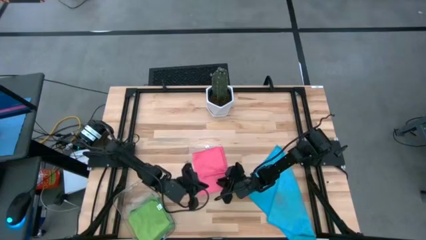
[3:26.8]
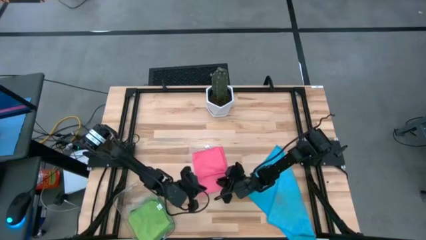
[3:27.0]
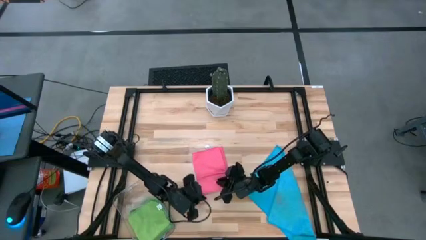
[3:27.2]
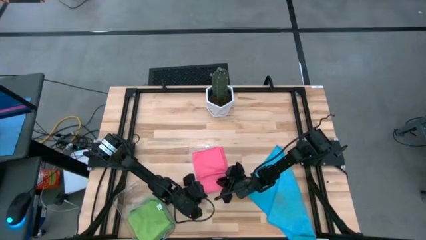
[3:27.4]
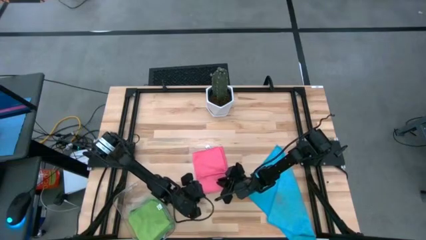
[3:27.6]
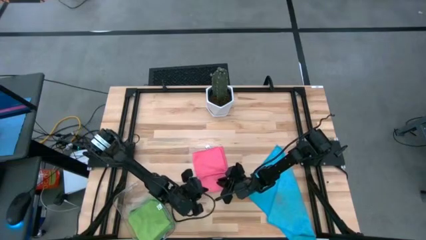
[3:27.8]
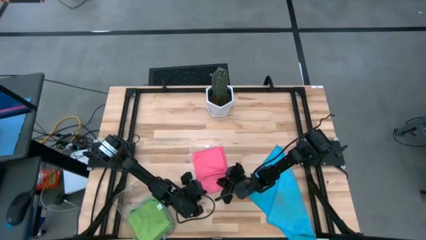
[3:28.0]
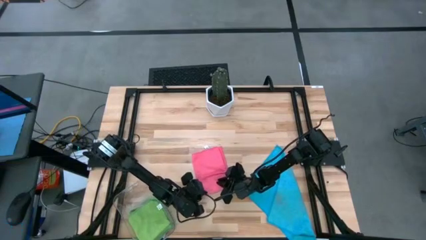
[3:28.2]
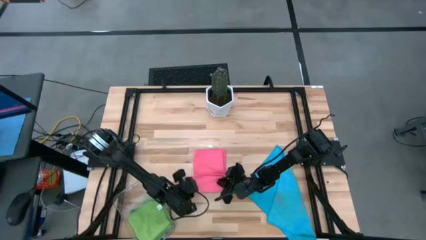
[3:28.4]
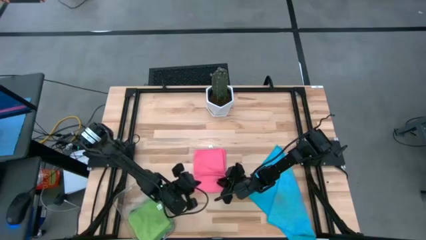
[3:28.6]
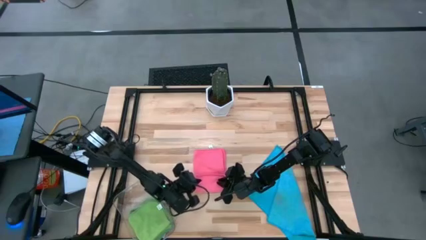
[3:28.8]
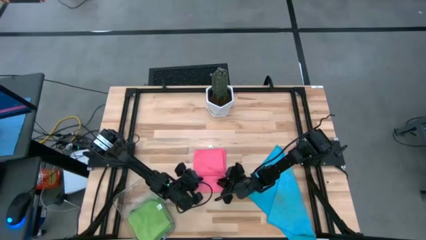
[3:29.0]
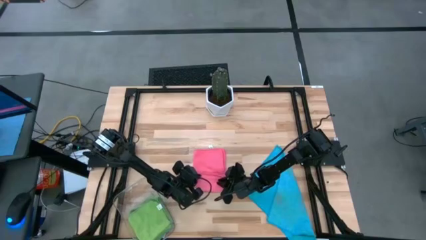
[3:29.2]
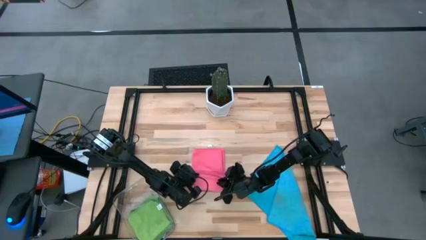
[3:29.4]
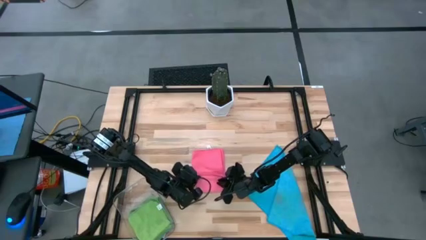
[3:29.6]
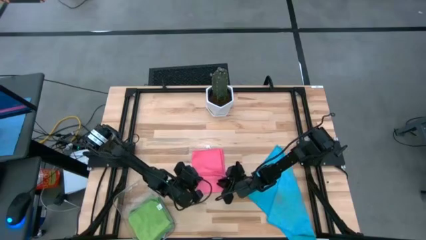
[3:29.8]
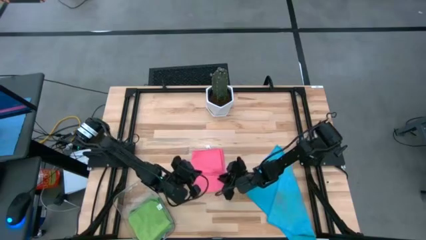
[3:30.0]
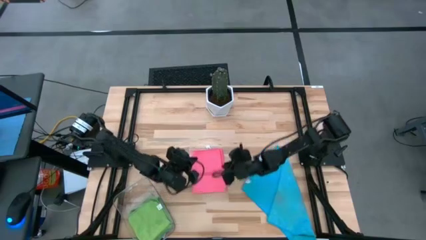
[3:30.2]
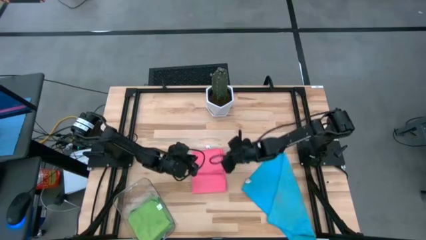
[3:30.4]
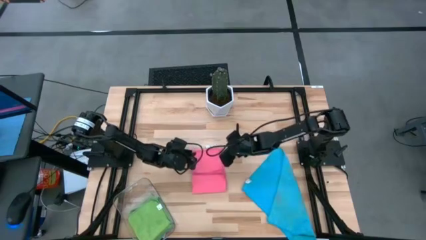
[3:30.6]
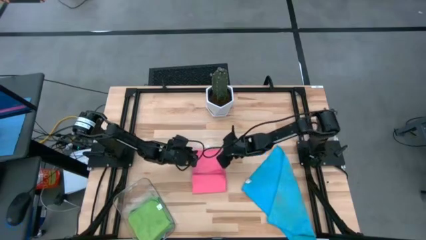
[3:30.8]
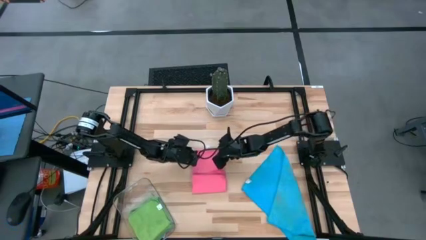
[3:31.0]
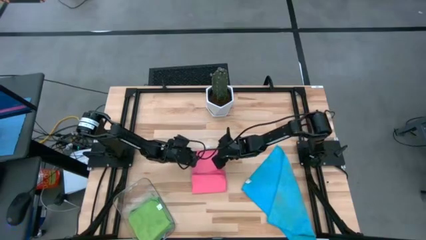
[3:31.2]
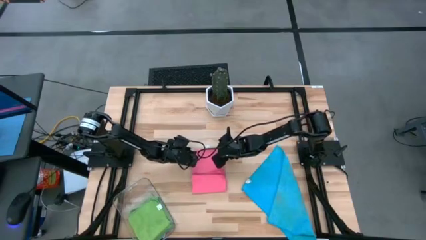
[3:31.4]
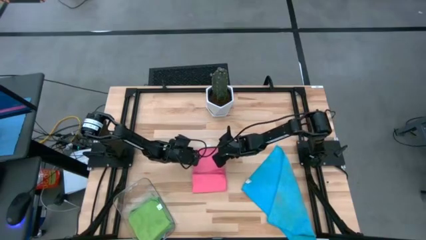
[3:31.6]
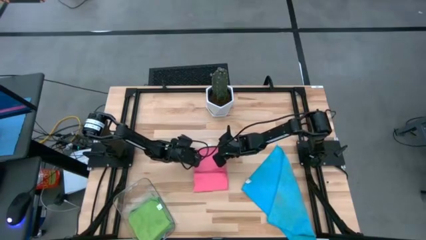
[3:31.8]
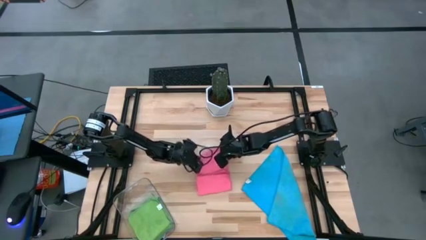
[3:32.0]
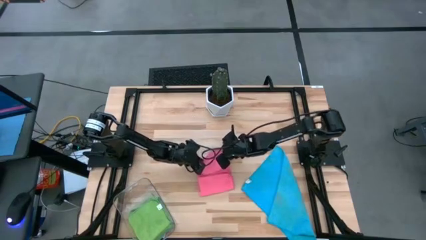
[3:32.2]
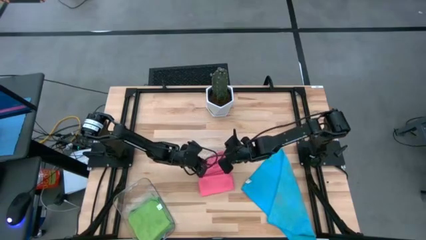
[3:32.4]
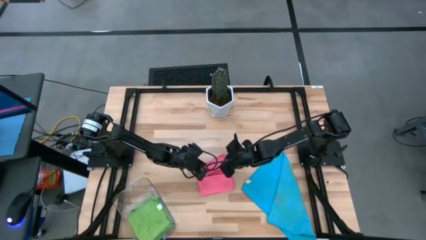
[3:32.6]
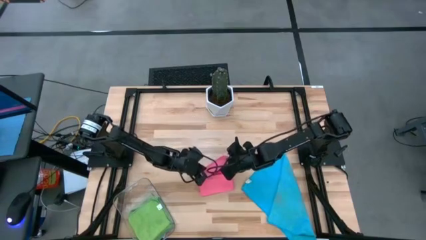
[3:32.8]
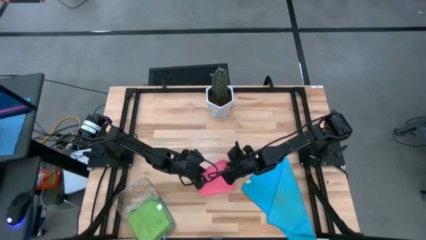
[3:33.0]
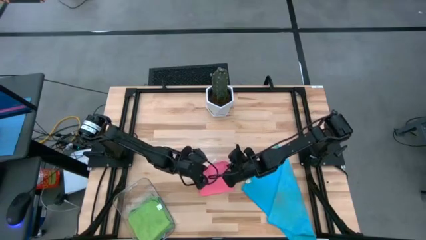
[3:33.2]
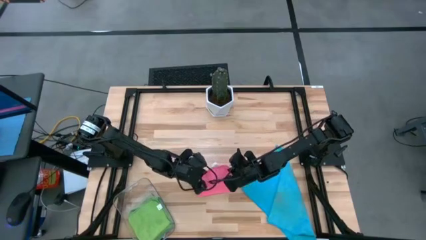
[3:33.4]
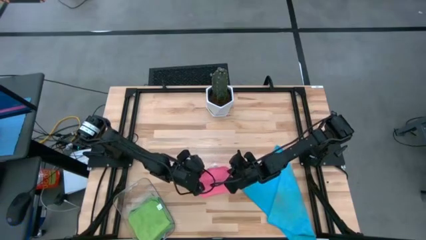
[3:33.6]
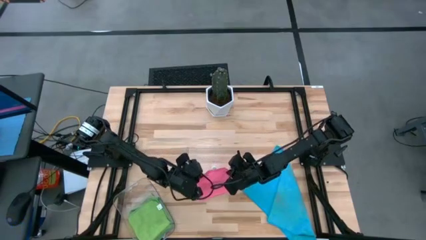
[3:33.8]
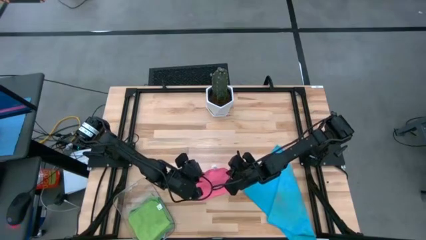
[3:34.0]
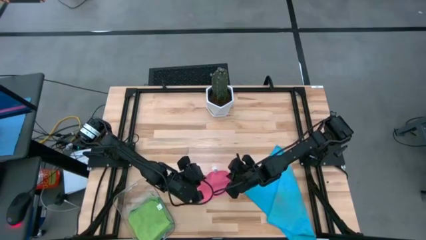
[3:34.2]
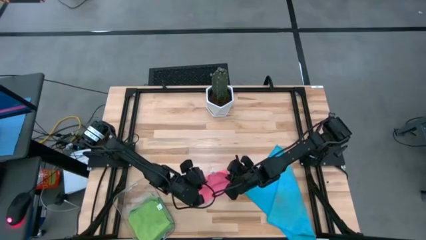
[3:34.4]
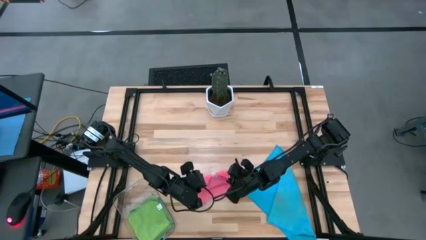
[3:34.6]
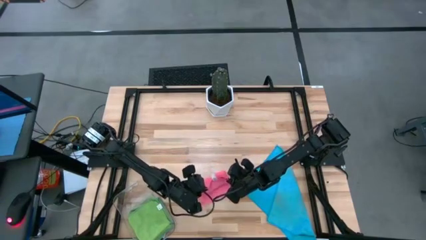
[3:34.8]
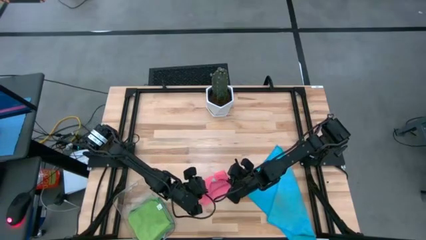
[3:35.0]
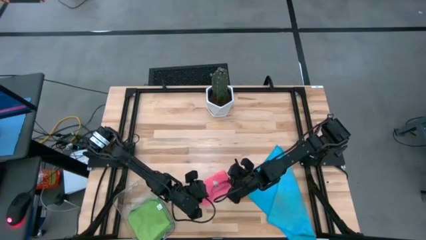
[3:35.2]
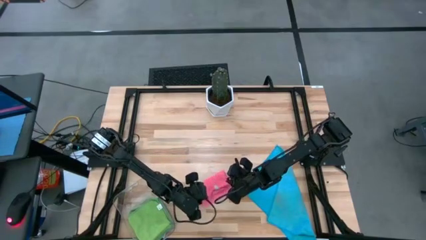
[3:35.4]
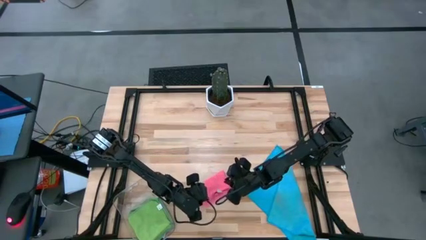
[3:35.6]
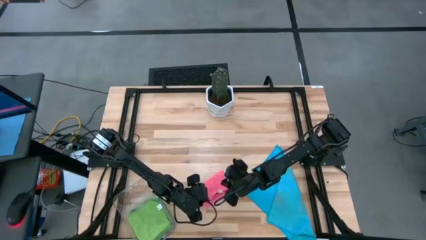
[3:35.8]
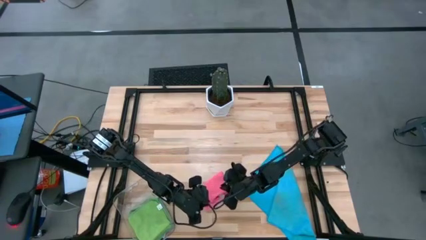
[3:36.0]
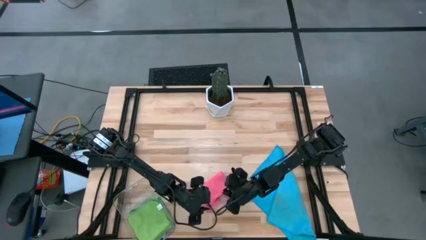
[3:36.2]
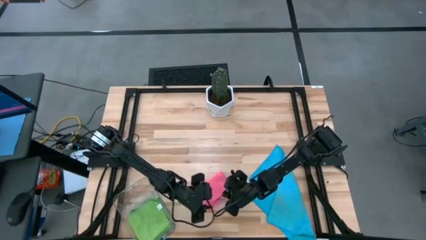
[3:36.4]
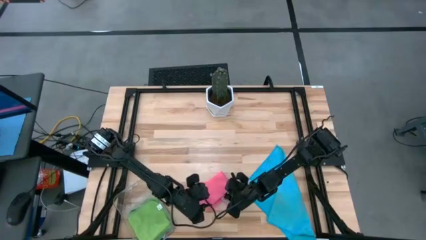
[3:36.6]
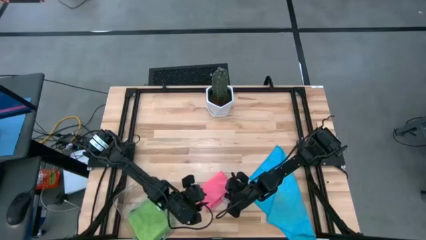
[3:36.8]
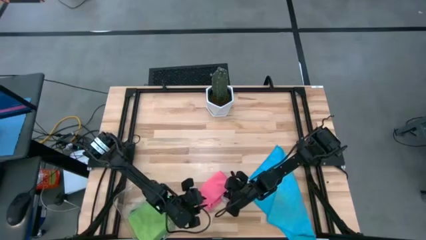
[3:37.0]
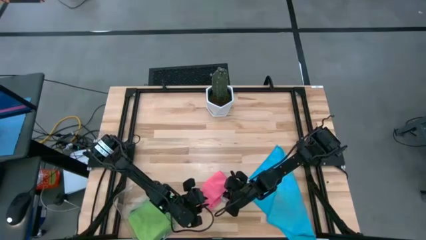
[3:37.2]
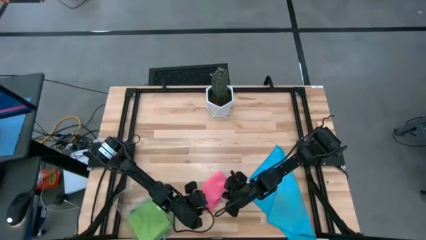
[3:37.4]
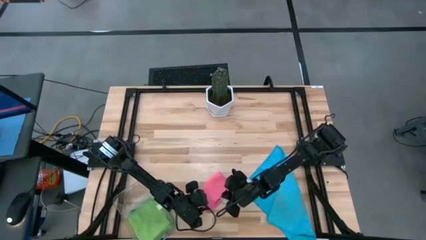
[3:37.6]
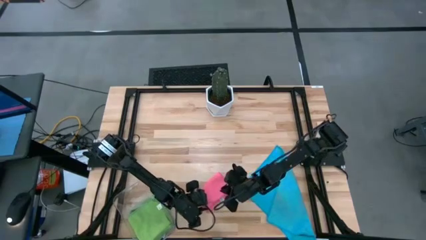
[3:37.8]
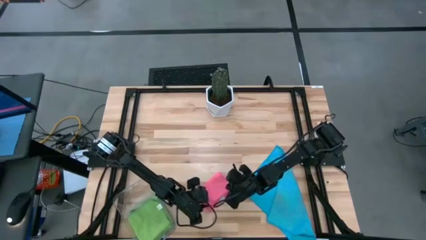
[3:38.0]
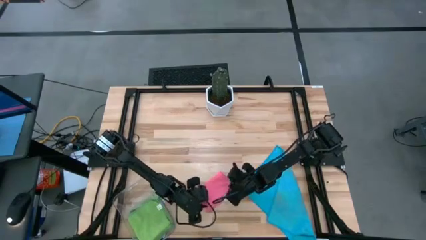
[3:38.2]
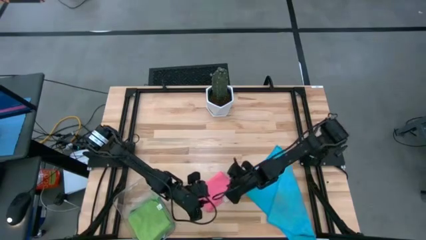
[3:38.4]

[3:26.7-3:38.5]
Task: Fold microfiber towels
Fold the pink microfiber cloth

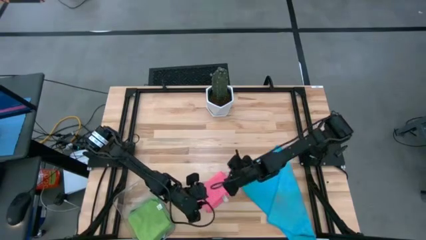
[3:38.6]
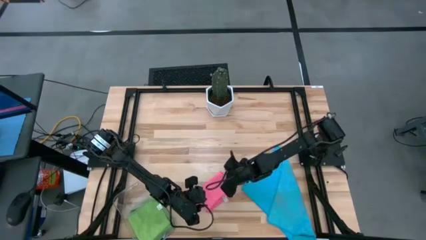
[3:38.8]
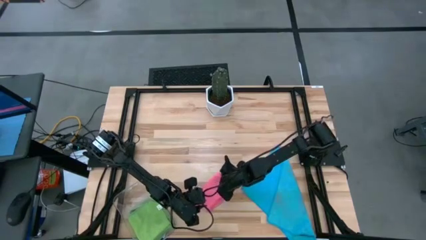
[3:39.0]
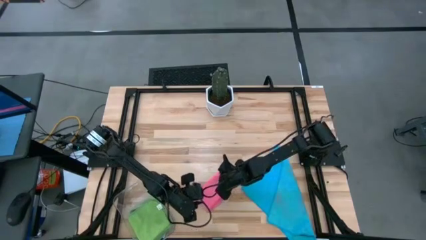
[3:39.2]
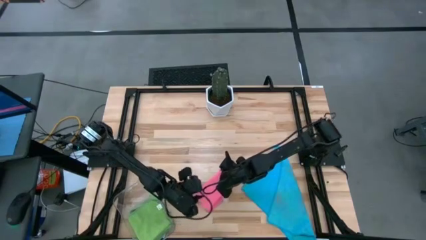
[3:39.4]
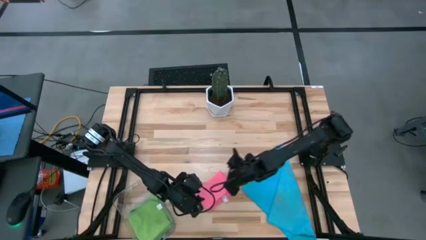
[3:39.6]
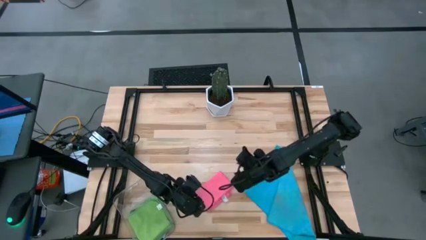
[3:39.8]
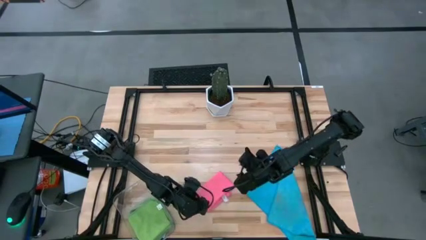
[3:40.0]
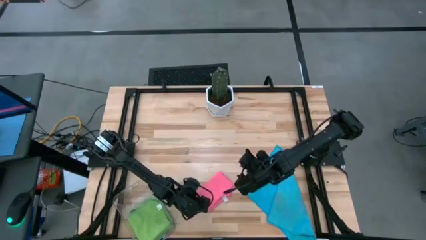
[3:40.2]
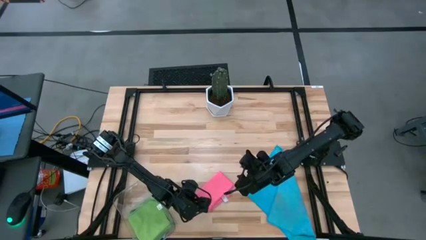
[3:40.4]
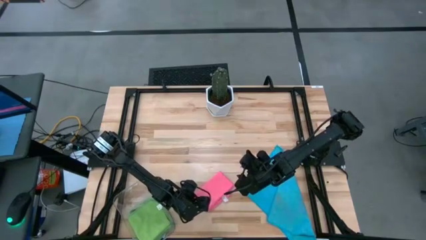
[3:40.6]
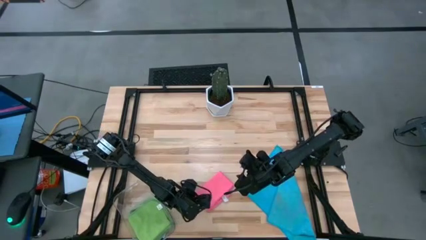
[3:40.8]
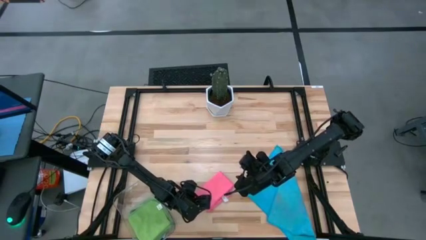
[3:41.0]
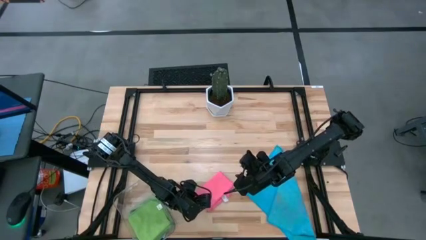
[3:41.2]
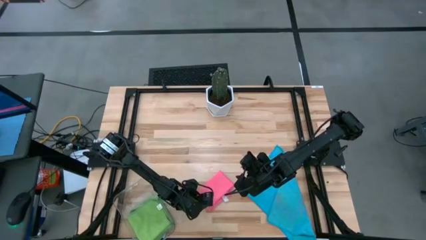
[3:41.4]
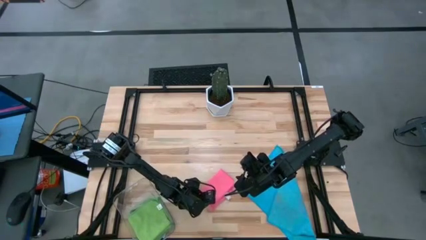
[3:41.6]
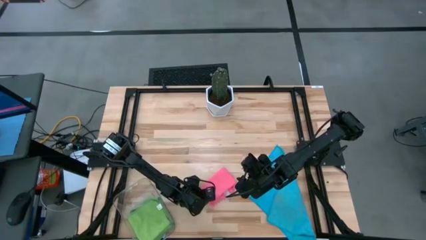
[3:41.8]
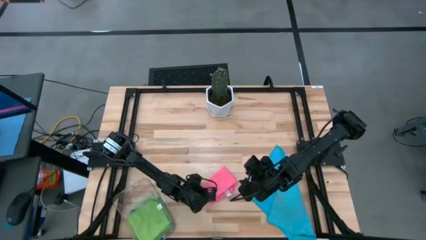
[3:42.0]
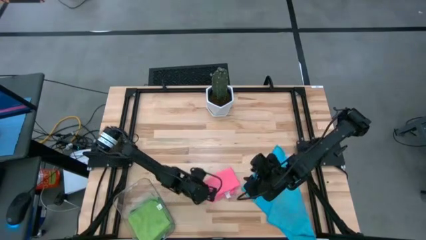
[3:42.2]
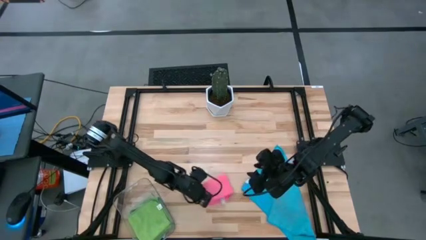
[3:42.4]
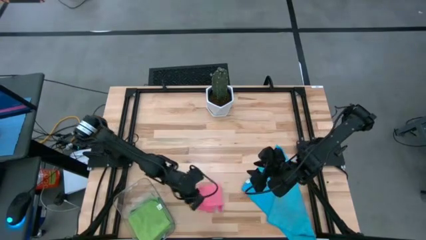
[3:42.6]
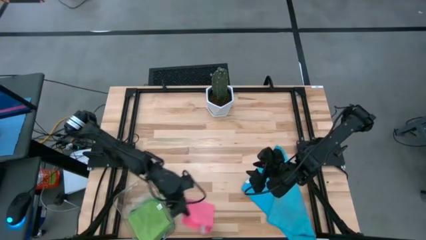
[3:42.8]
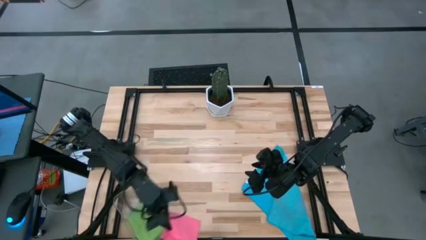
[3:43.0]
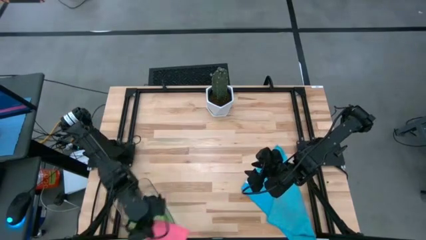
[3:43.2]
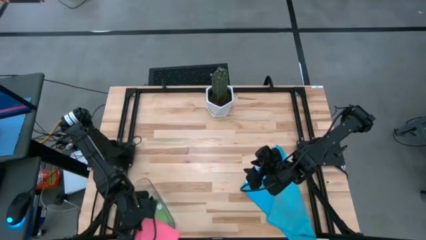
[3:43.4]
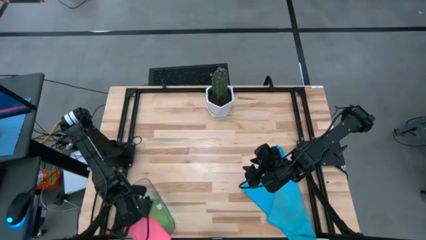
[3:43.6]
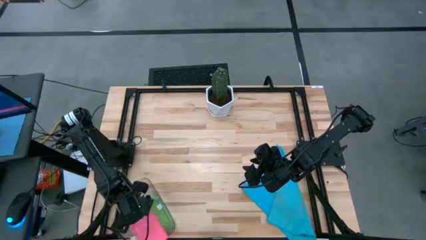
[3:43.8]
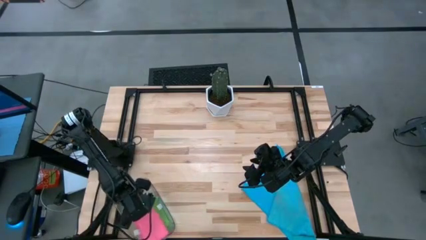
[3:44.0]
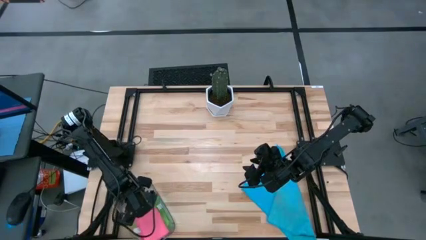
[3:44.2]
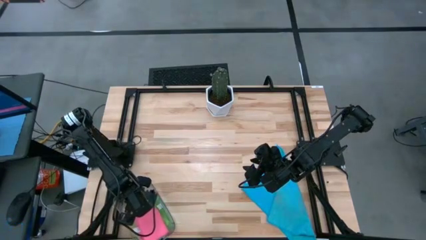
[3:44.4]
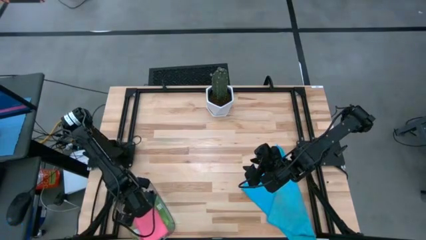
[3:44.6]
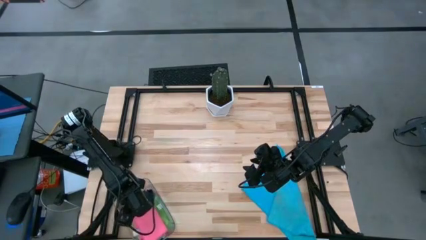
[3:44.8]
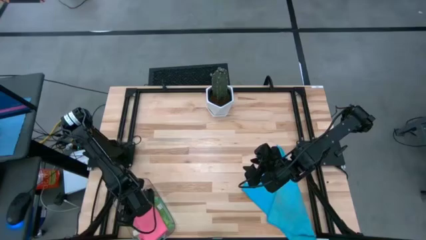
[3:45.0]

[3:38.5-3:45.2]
Put the folded pink microfiber cloth into the transparent bin
